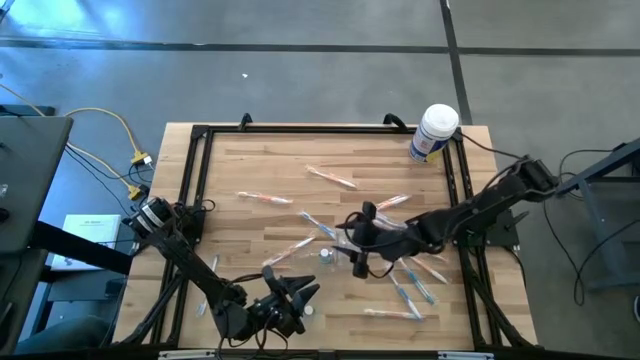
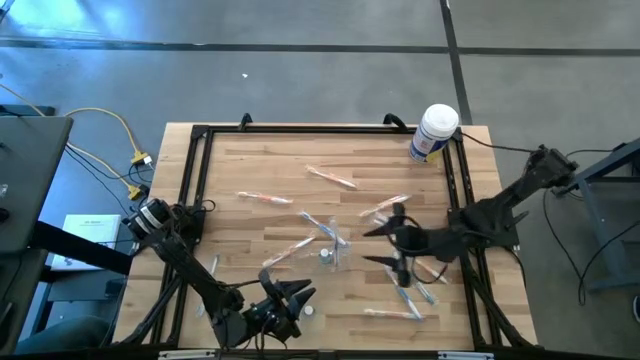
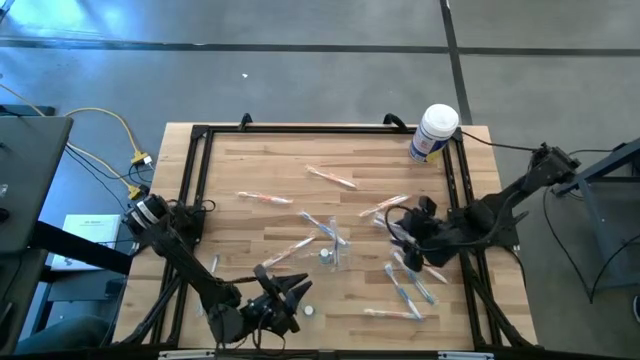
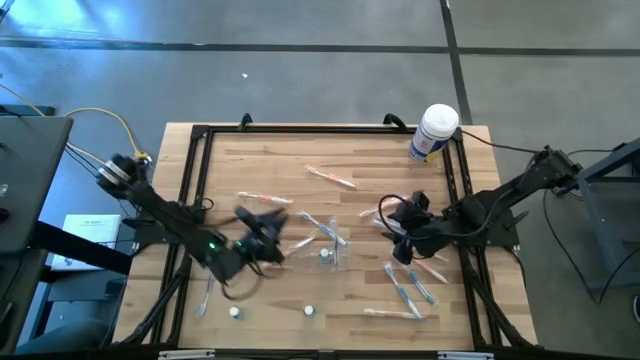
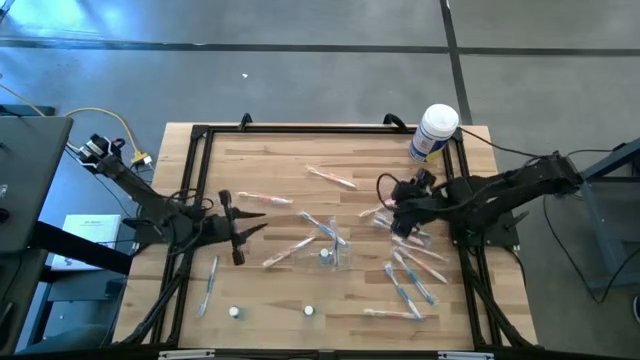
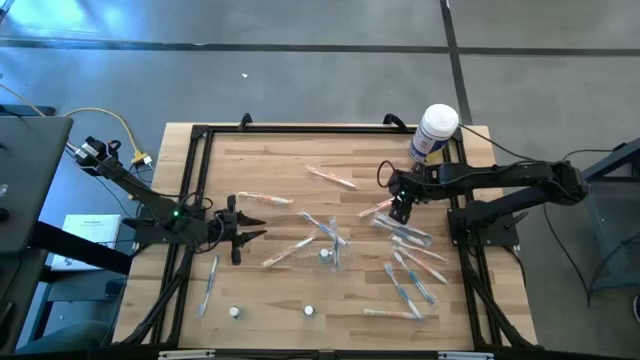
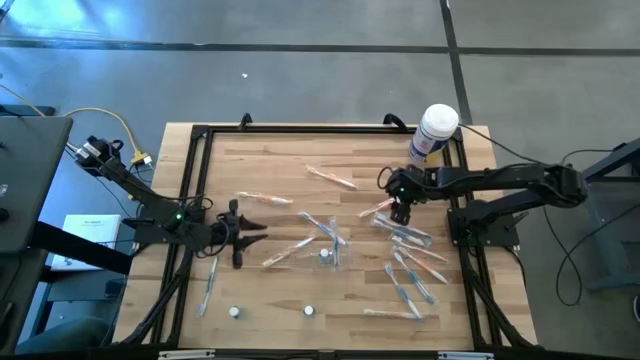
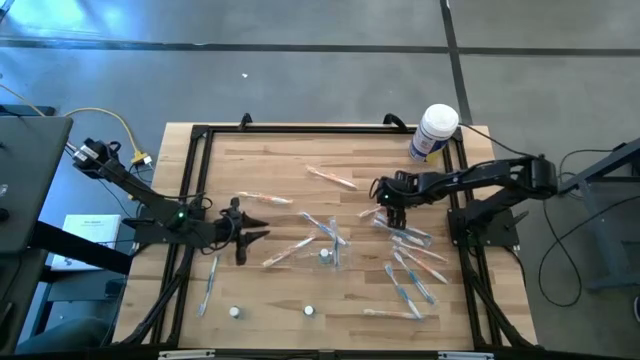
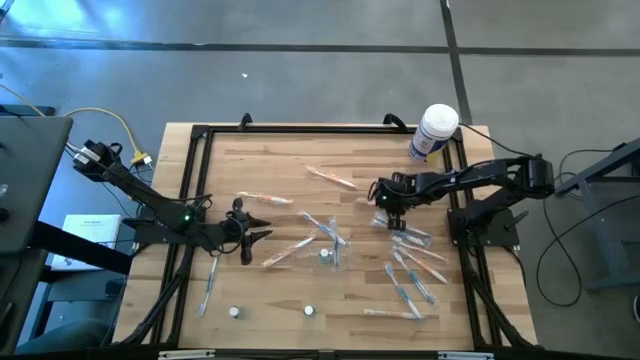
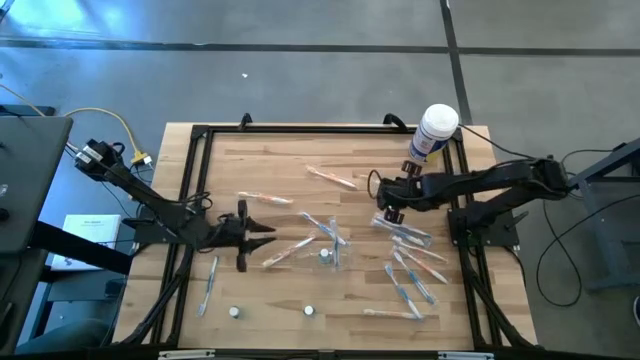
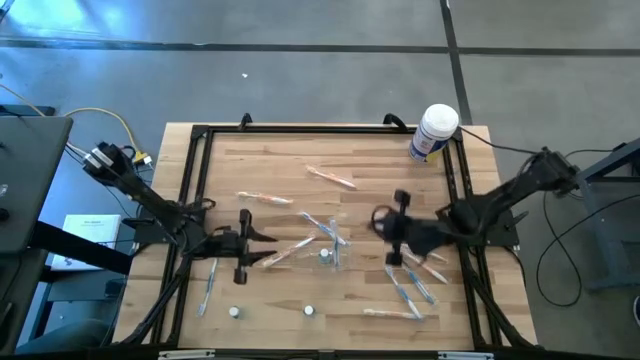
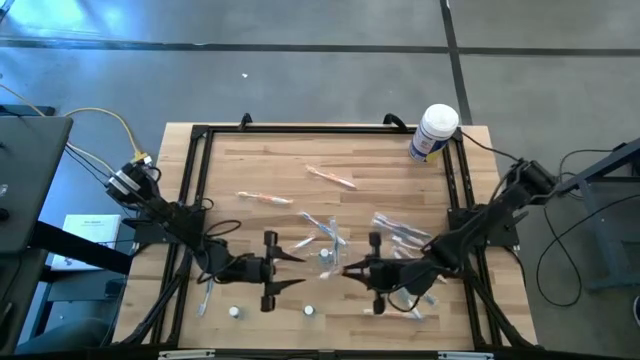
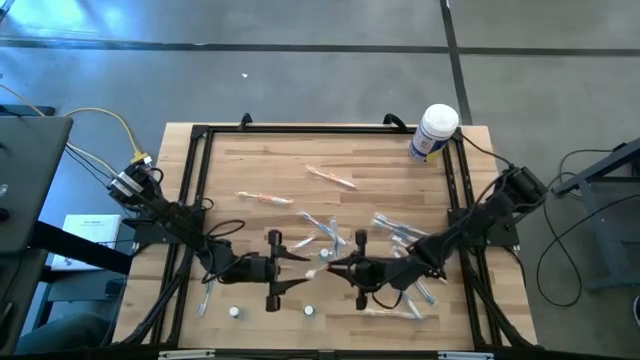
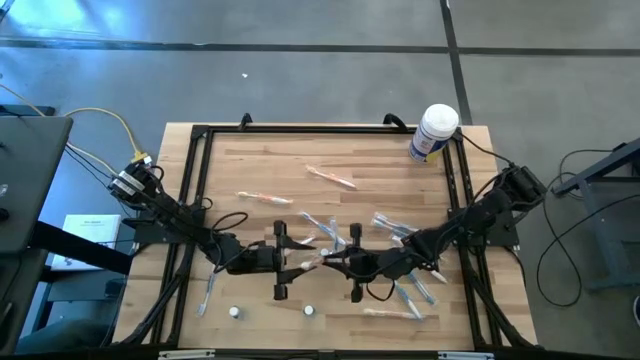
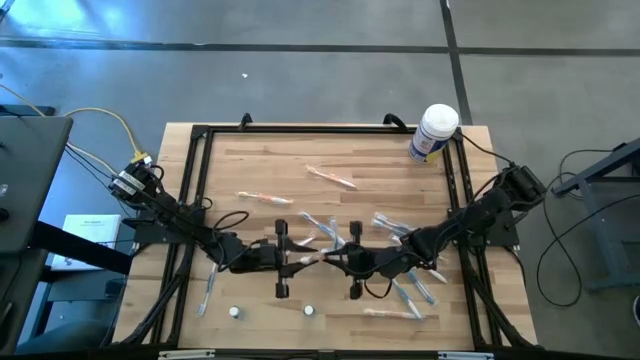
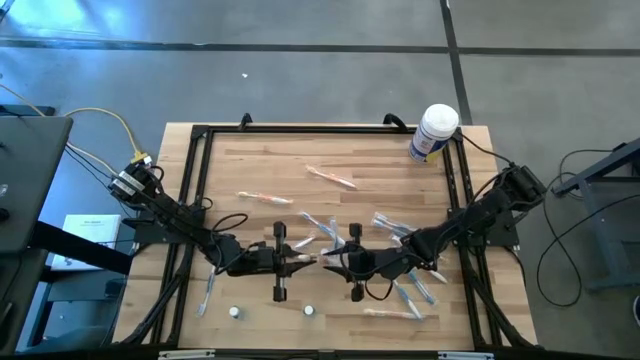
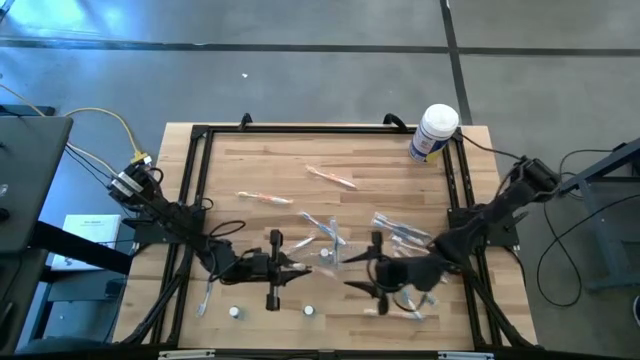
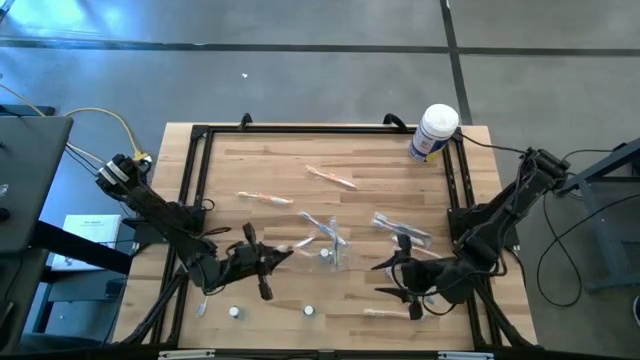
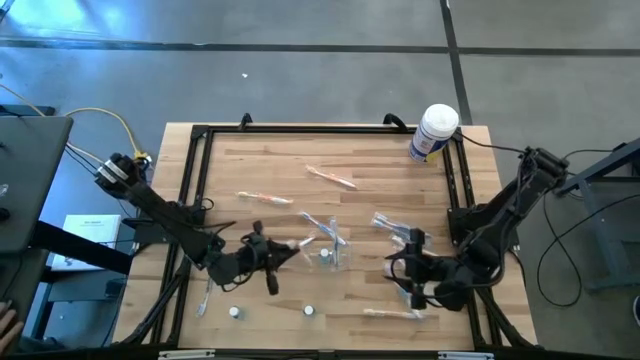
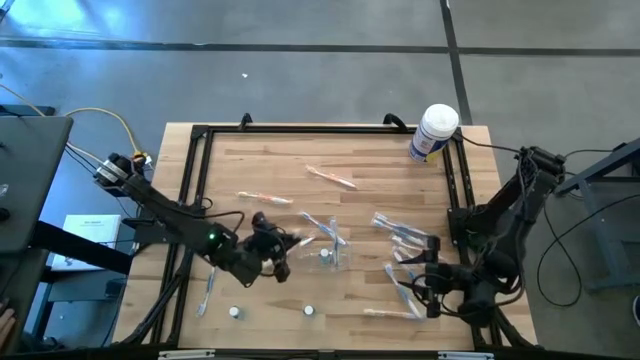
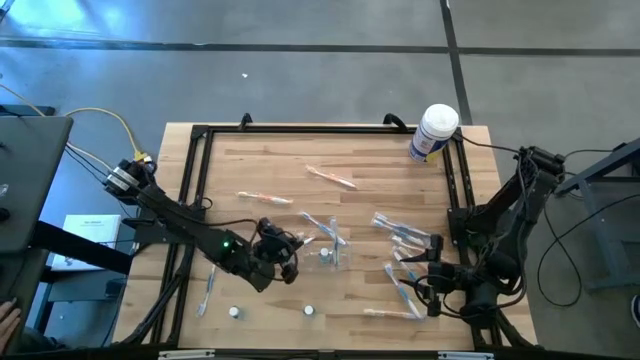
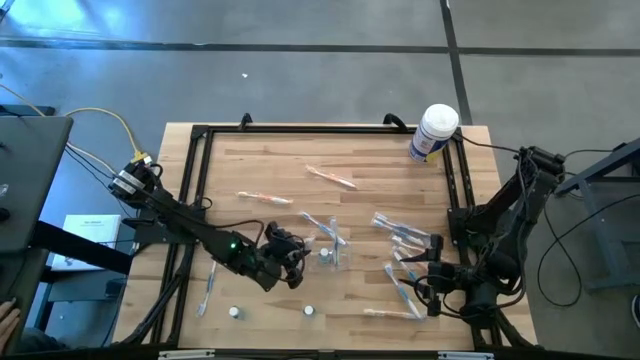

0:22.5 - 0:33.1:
Task: Pick & Place toothbrushing station
Put the orange toothbrush into the transparent organizer

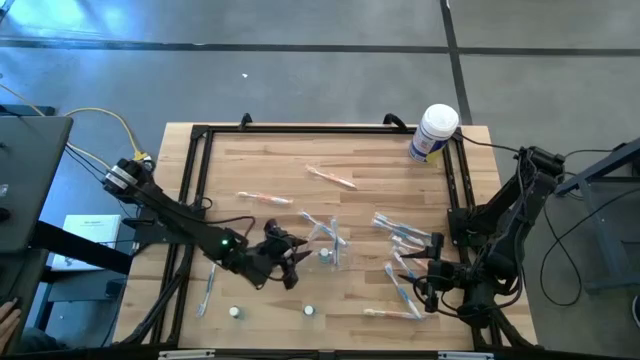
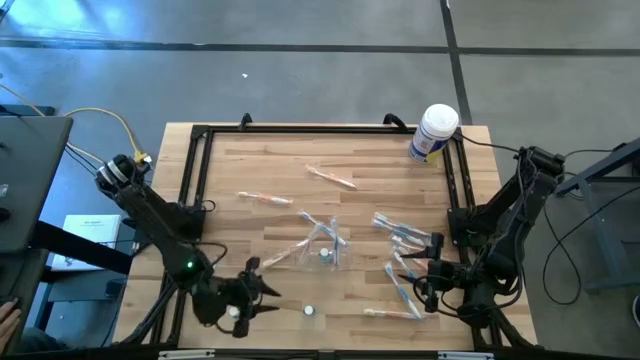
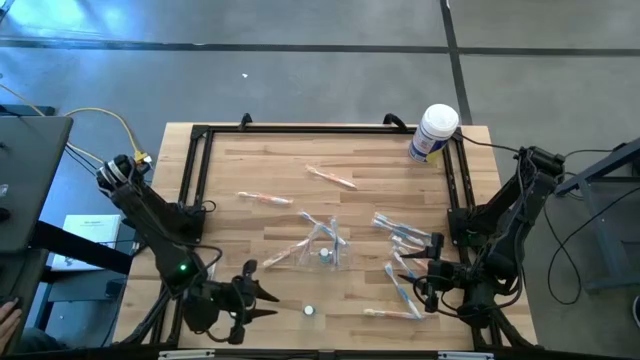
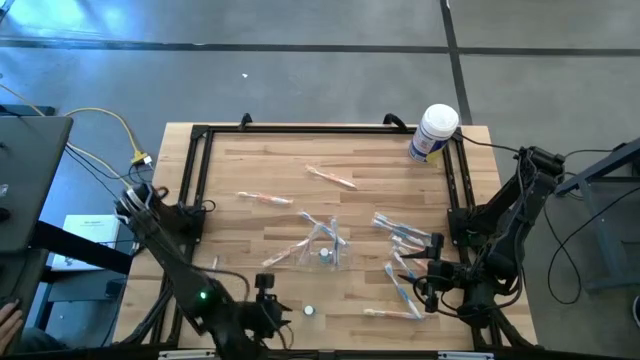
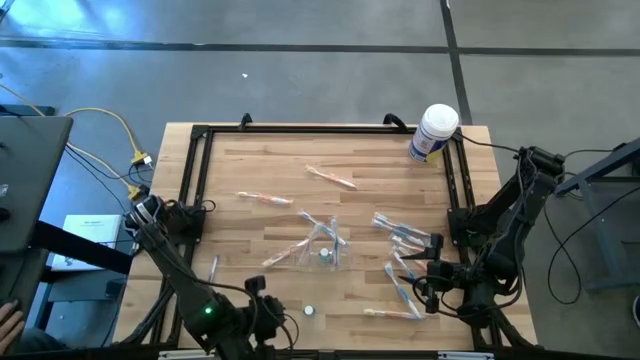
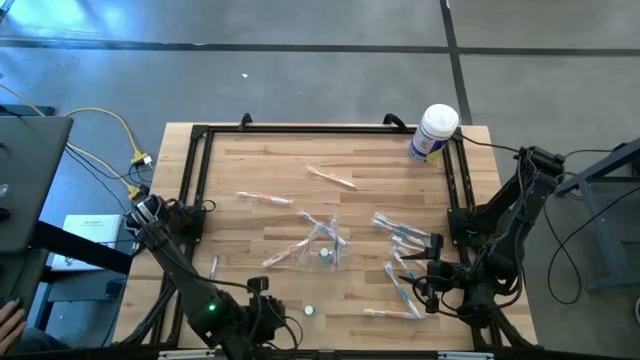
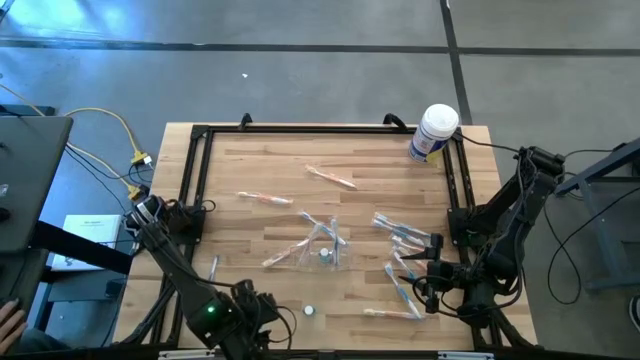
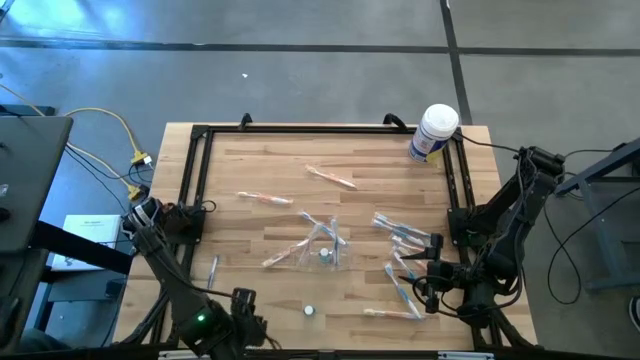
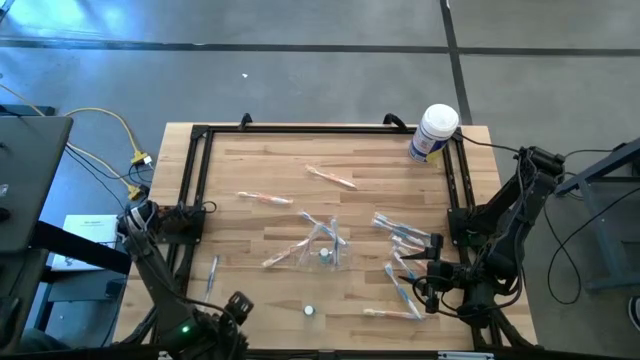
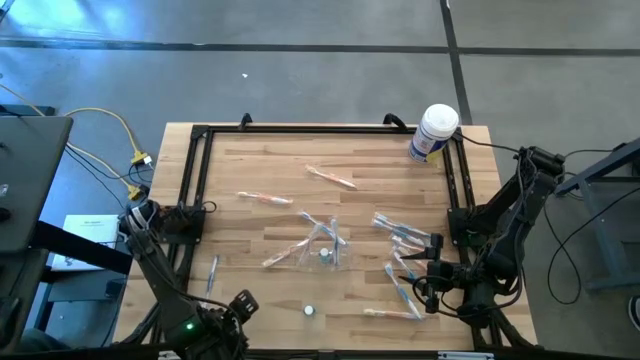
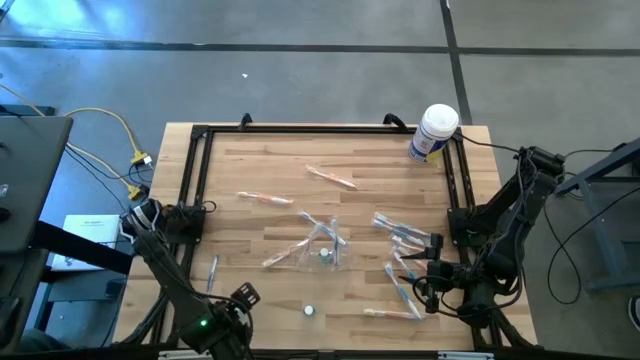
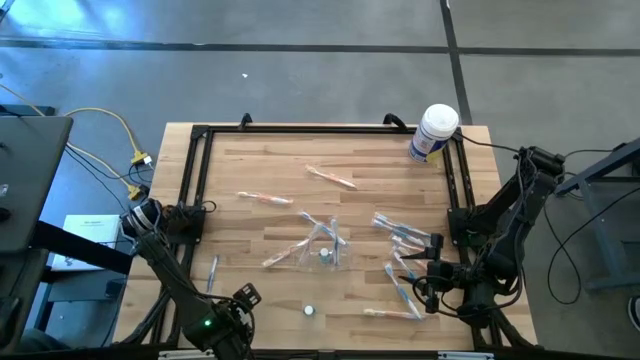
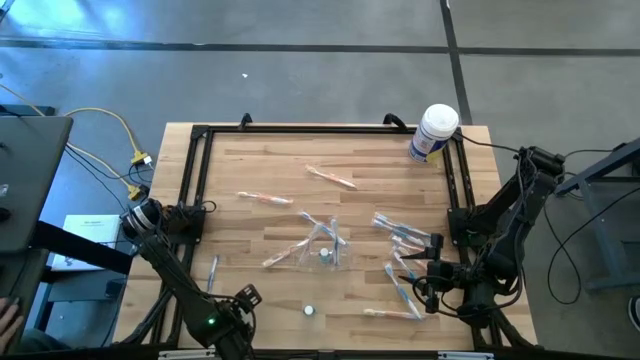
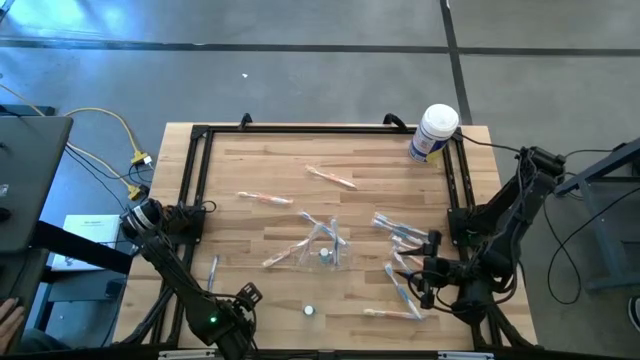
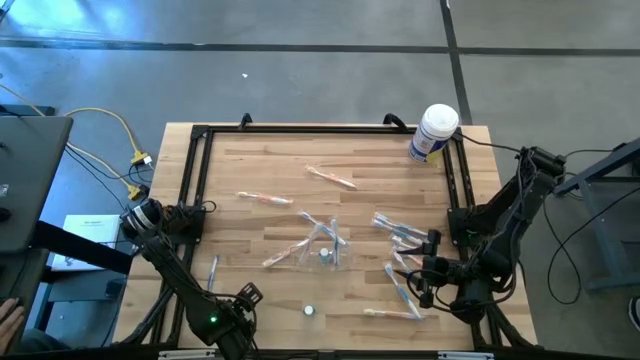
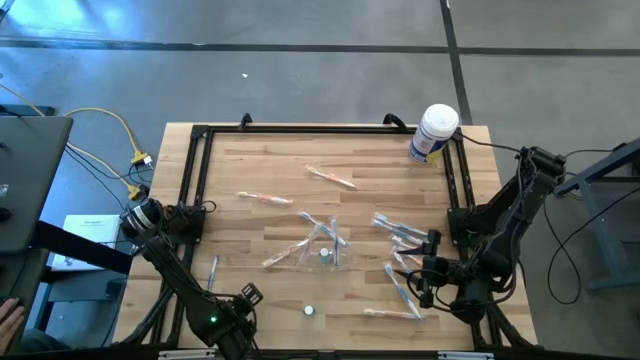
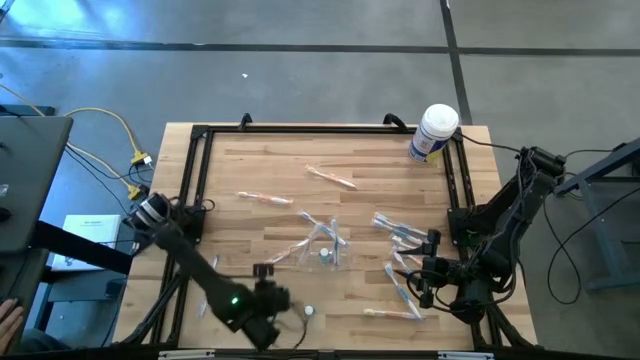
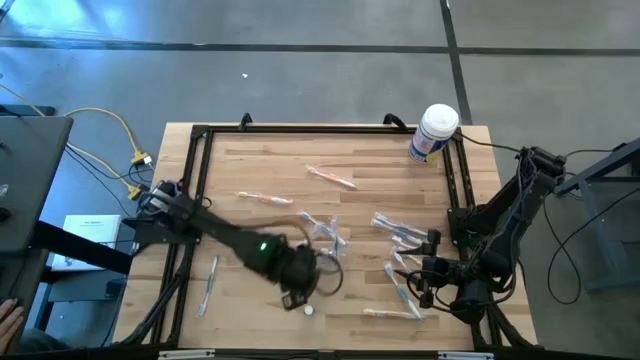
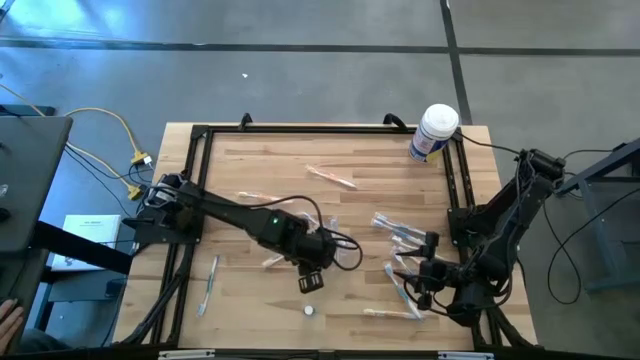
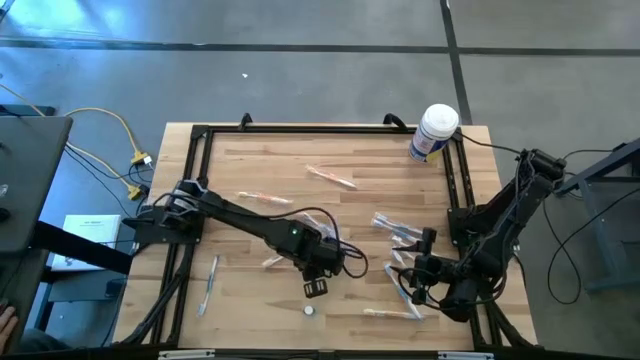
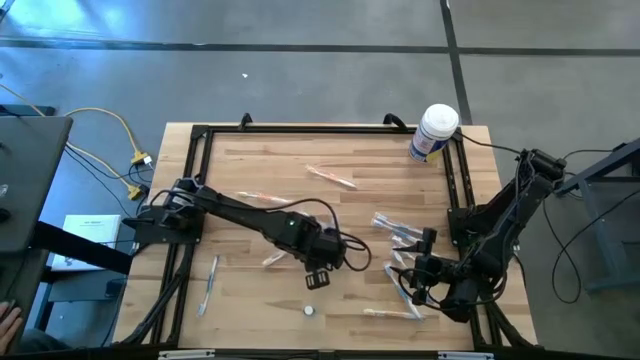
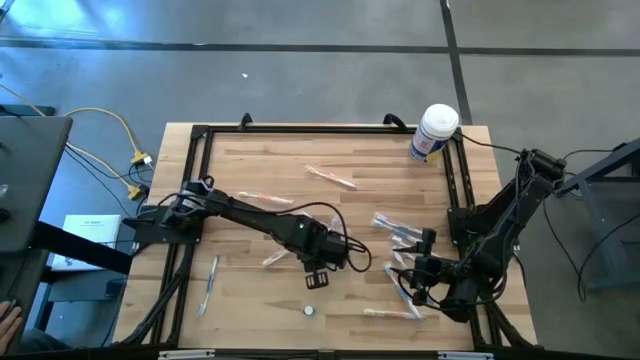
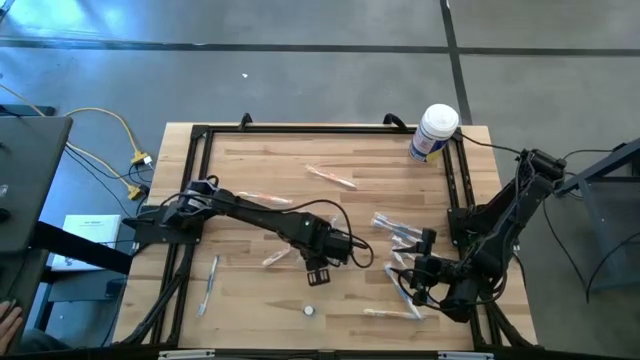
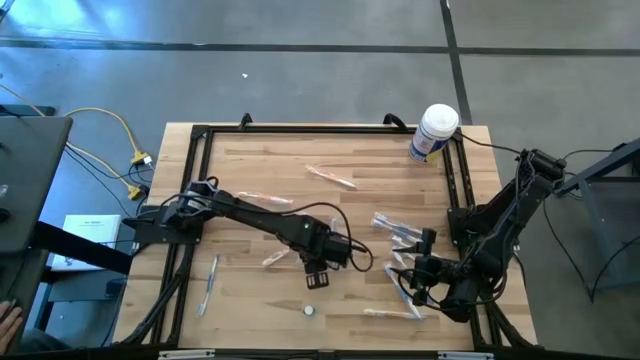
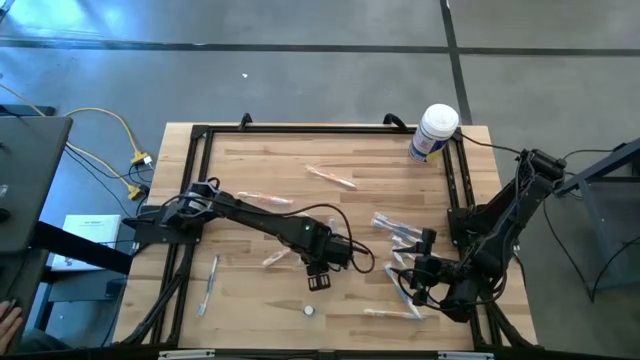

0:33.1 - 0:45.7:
Put the blue mouthwash into the transparent organizer
